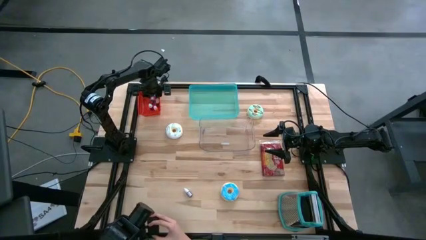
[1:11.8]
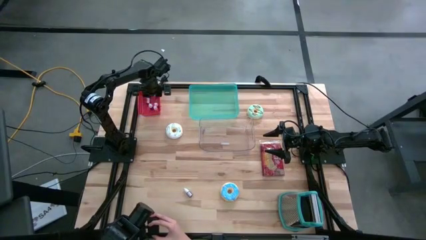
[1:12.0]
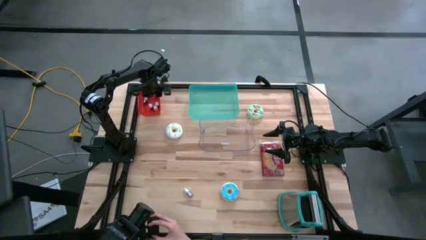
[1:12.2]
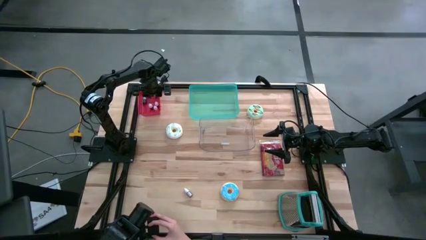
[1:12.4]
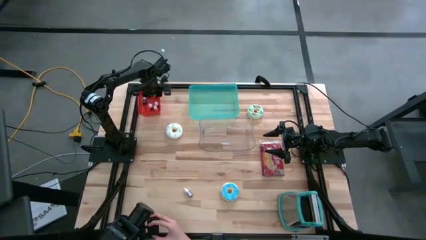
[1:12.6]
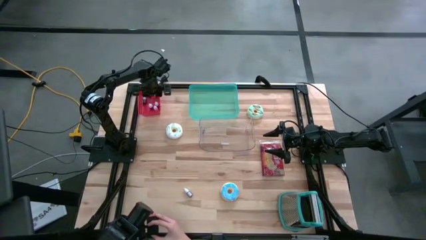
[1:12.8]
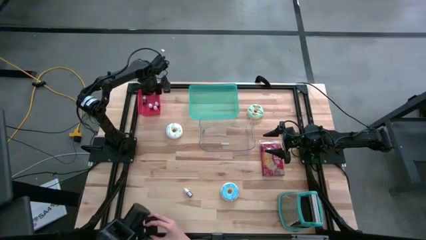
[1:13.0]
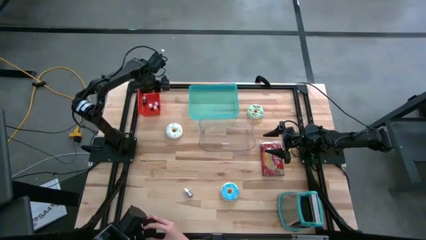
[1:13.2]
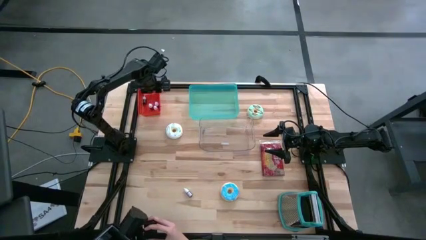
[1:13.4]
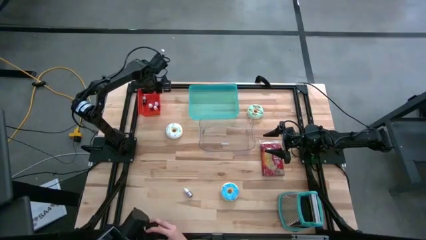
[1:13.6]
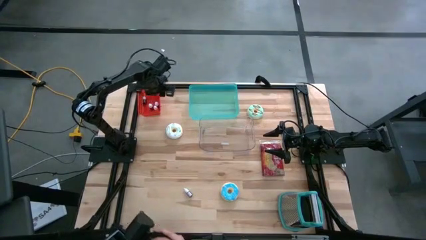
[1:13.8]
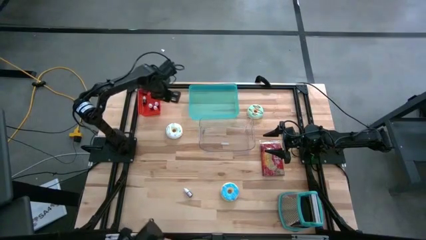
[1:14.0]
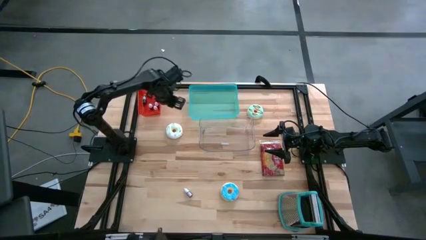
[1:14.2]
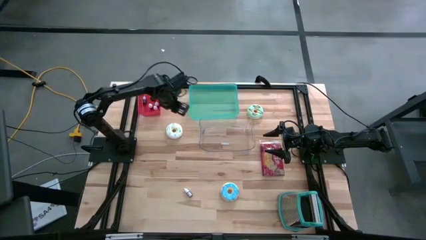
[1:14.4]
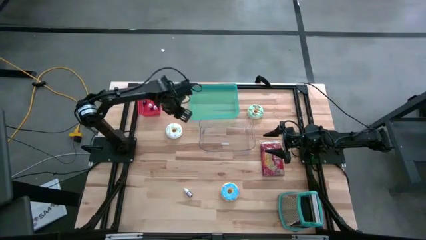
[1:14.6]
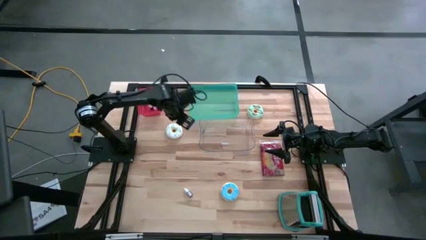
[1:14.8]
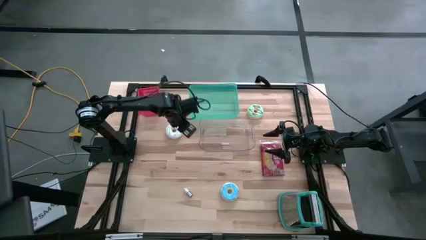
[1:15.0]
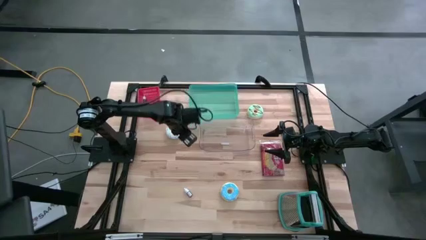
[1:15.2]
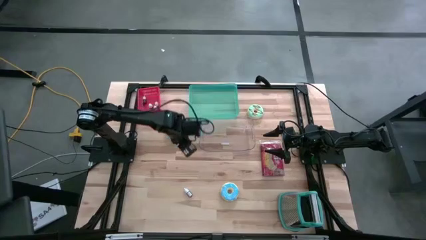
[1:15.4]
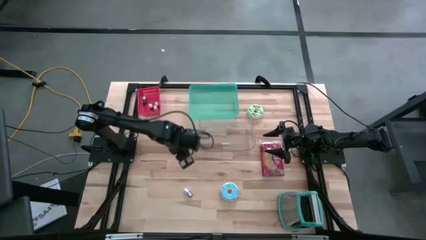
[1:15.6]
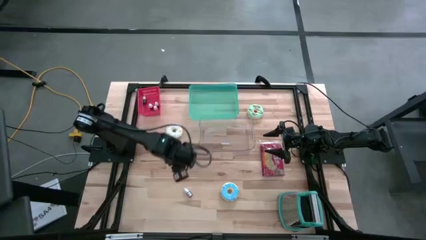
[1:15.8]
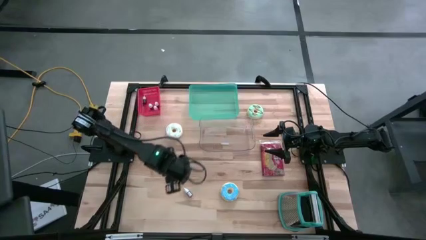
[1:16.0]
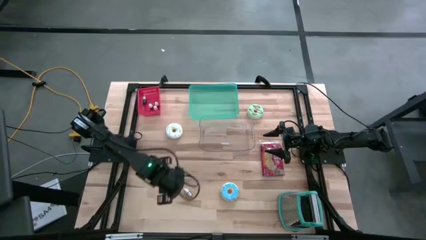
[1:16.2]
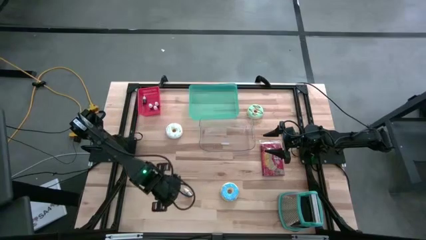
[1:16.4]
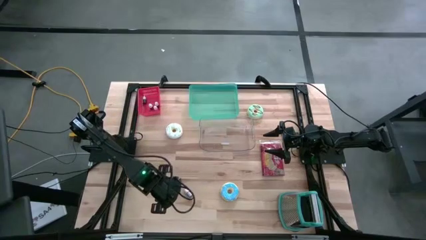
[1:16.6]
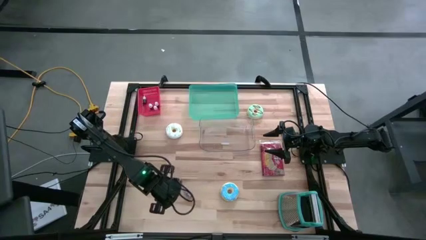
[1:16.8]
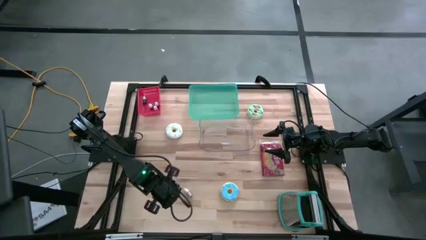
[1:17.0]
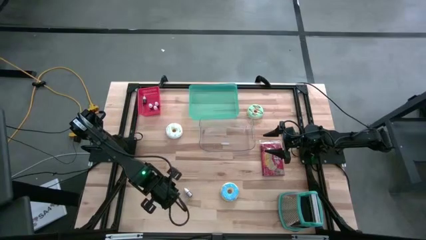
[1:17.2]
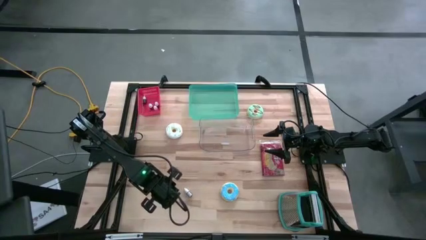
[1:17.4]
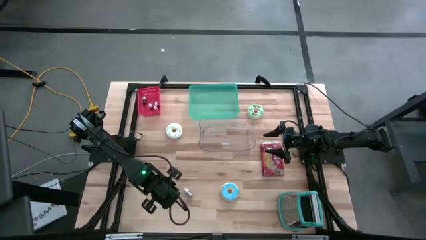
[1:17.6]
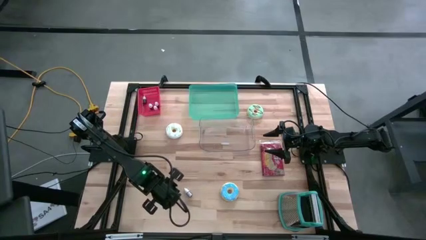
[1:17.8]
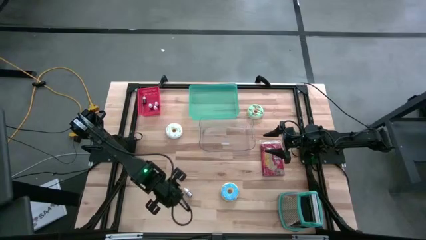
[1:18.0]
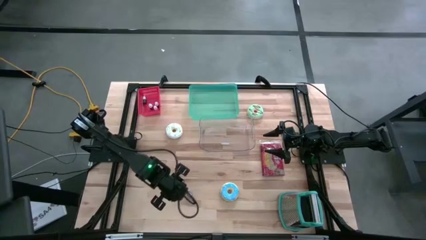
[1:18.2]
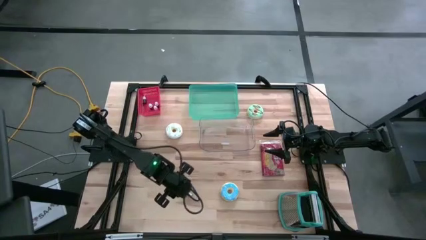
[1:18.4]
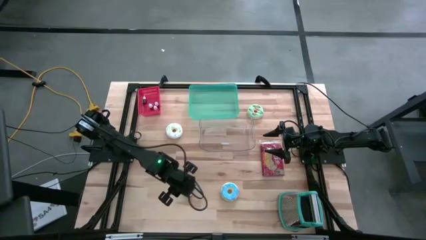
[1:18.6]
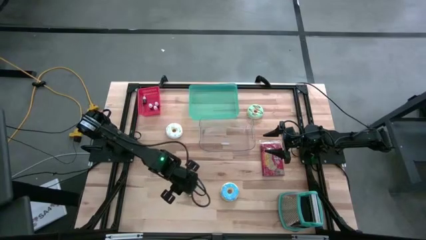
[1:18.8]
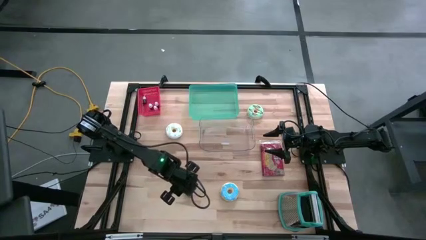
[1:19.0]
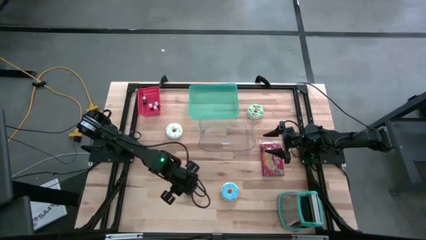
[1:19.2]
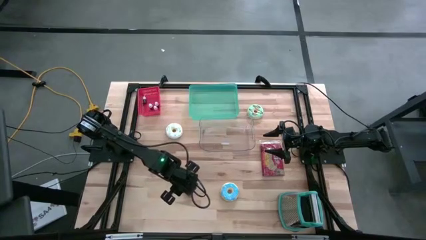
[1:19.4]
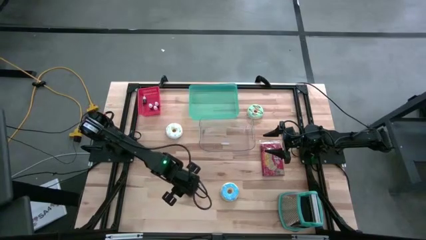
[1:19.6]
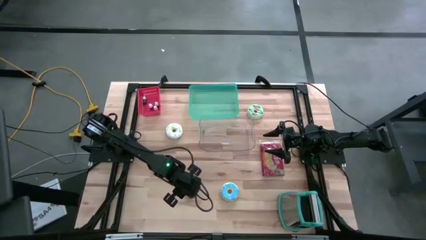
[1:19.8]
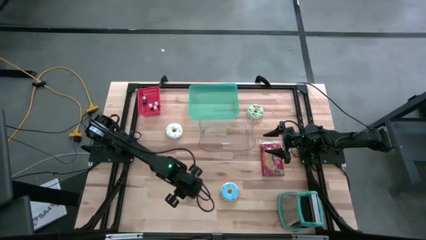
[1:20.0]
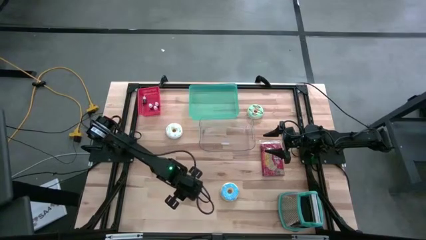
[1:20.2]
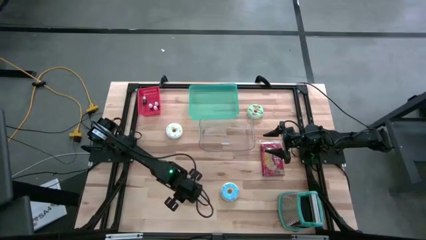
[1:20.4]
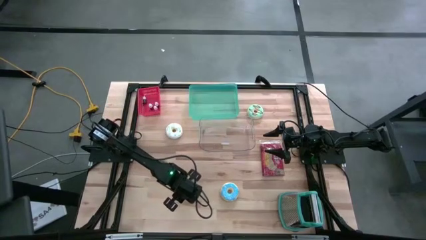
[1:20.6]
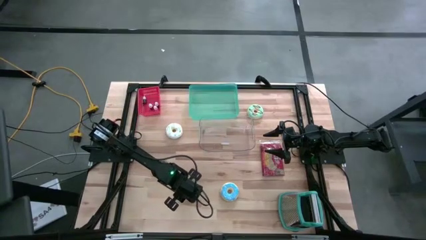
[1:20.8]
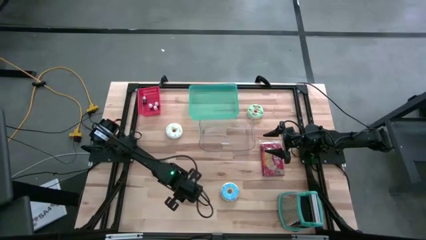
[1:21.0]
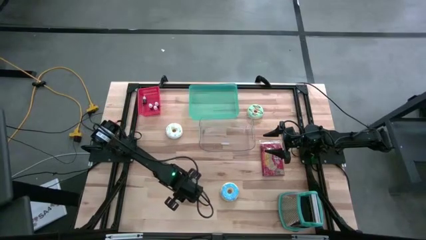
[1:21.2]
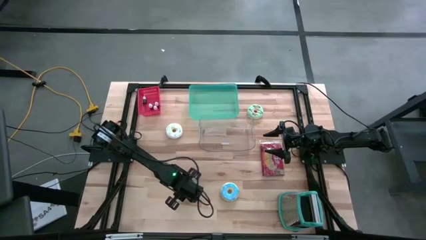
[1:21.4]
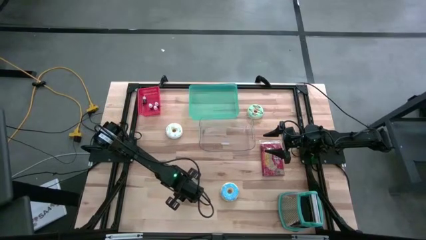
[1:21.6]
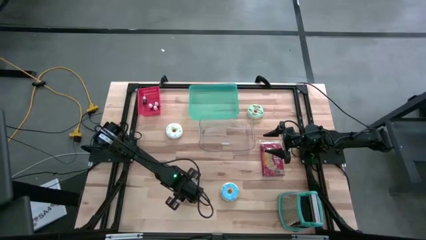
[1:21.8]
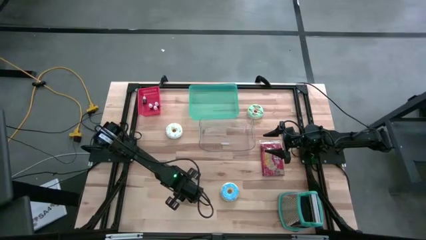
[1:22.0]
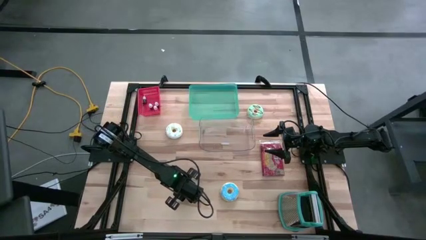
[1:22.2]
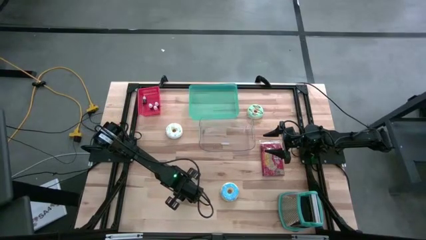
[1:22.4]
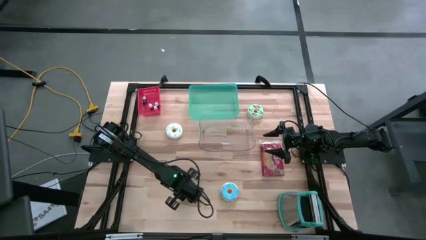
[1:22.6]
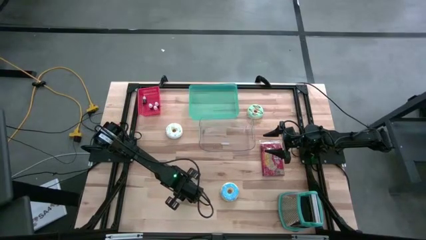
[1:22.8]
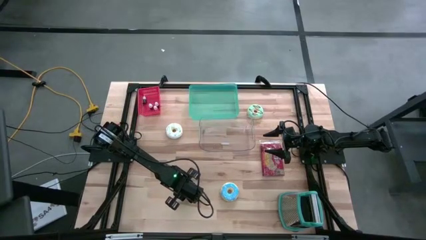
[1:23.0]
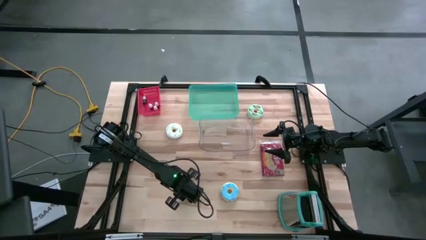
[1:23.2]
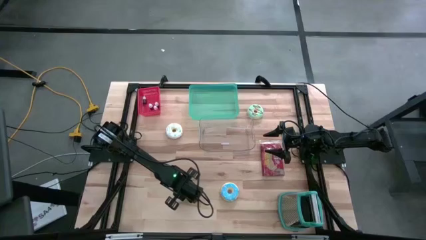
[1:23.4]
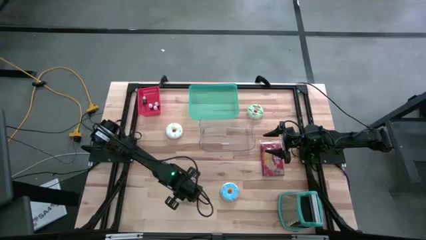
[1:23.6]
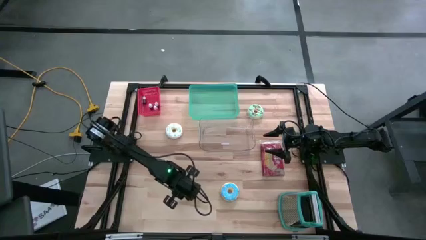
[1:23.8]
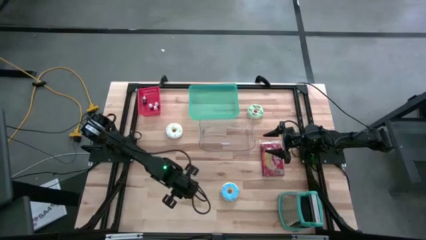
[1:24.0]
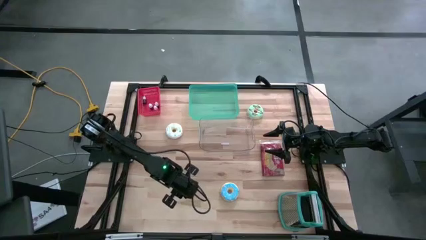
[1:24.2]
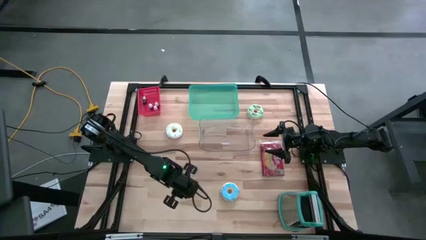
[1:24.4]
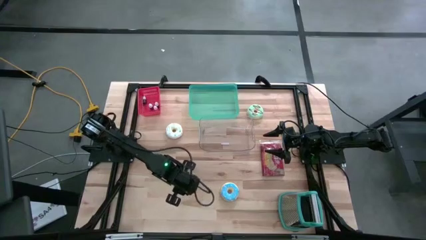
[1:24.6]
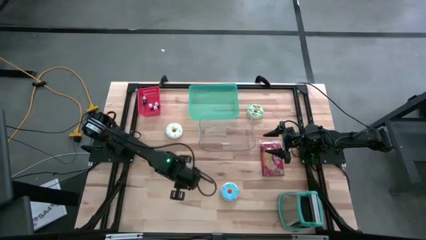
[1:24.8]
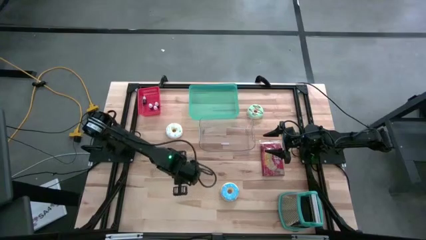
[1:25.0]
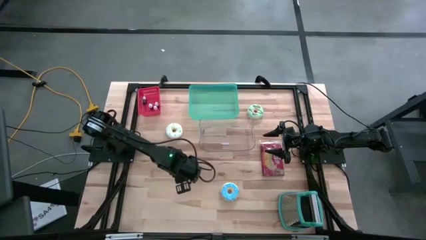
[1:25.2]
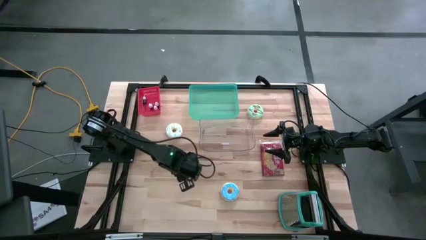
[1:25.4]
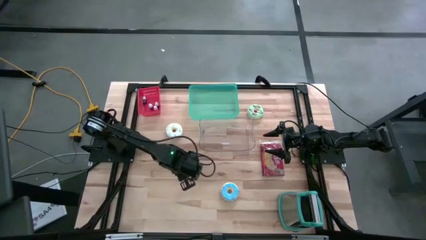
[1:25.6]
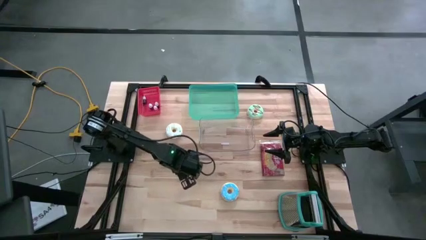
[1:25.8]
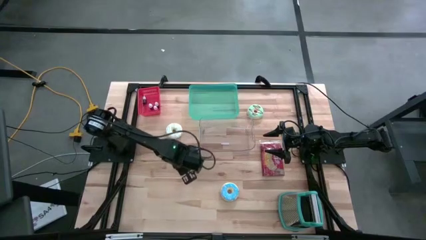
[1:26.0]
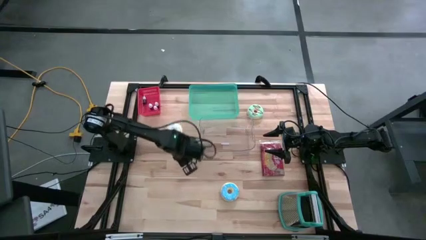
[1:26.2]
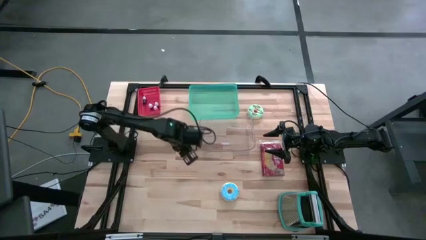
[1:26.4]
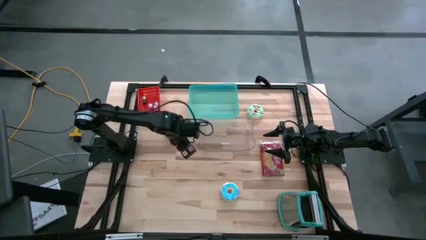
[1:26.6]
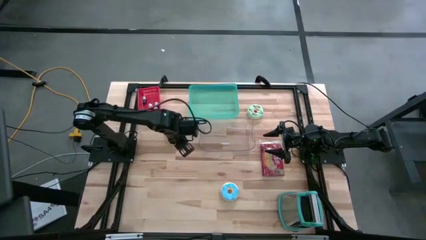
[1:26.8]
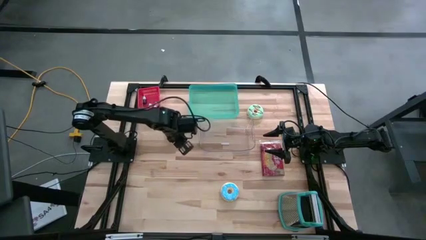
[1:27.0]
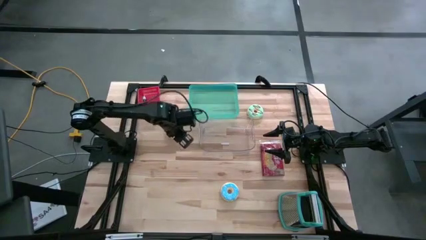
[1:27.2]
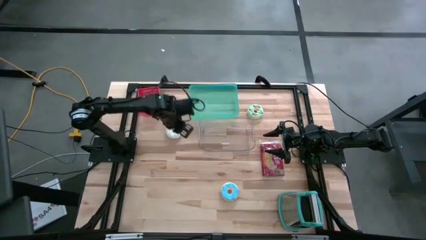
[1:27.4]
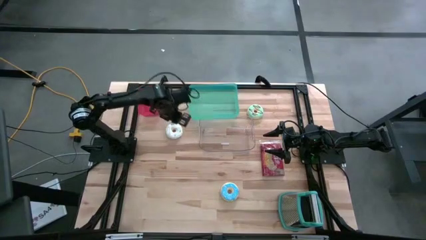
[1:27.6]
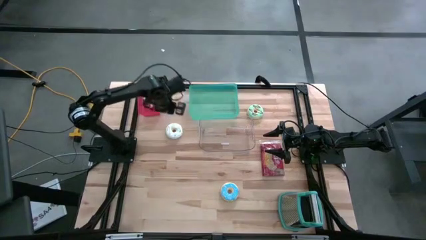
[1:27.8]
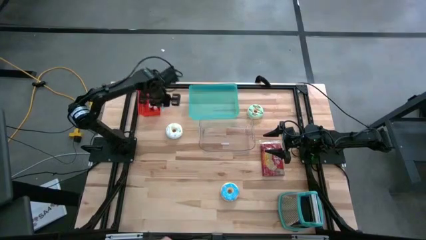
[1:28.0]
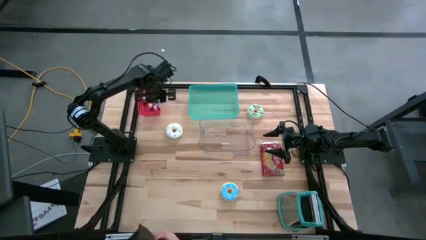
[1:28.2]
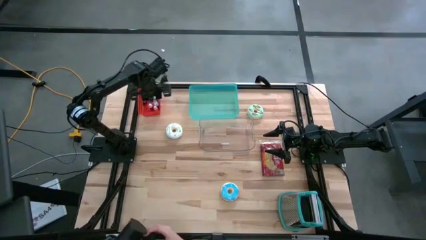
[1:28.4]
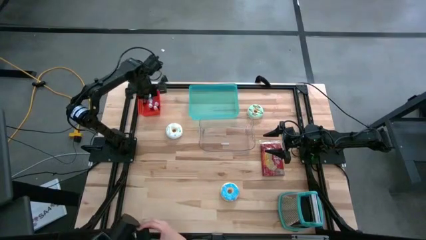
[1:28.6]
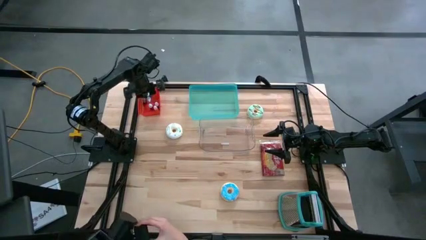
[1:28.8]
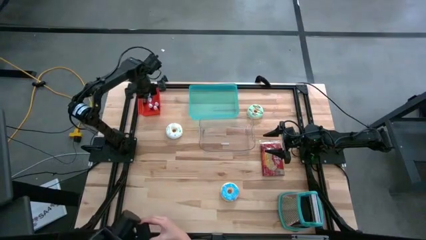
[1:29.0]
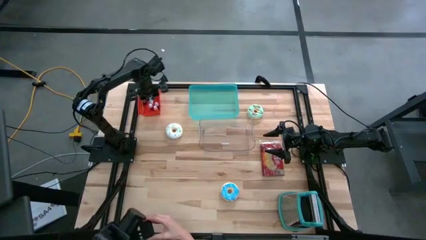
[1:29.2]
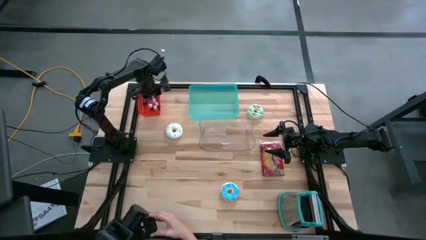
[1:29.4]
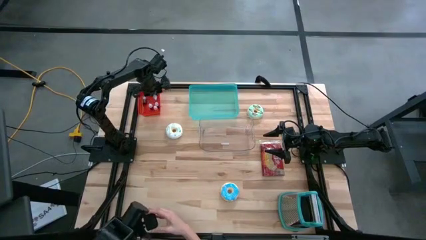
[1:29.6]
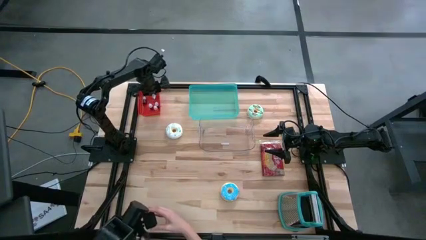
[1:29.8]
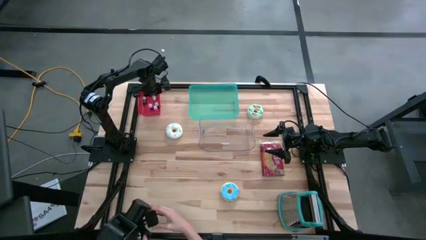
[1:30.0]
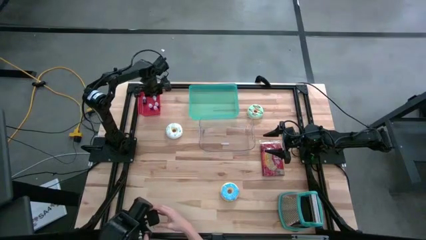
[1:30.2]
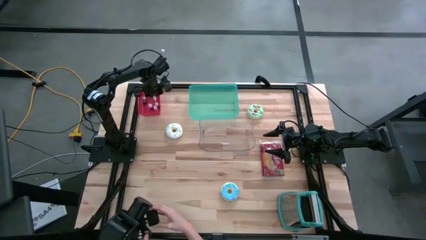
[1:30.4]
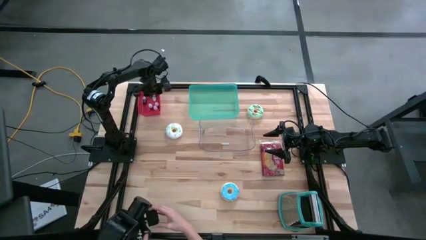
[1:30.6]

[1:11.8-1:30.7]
Put the red food coloring bottle into the red bin
